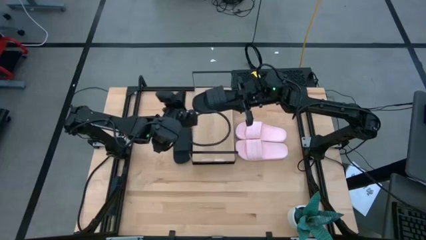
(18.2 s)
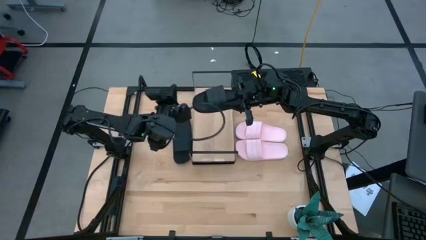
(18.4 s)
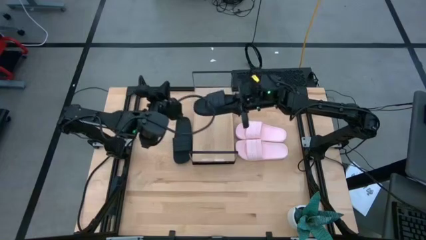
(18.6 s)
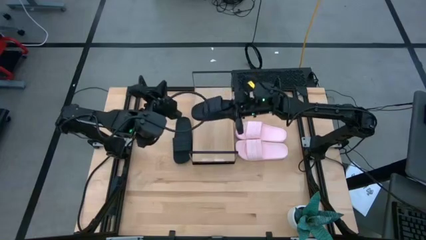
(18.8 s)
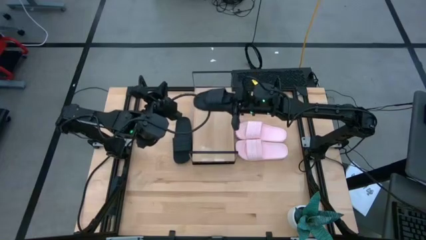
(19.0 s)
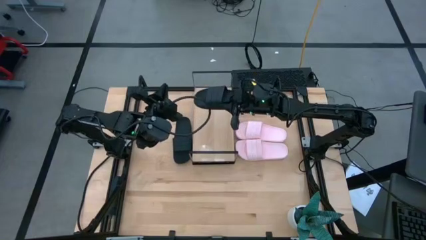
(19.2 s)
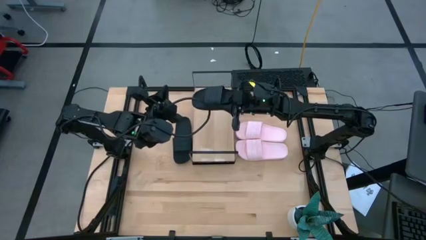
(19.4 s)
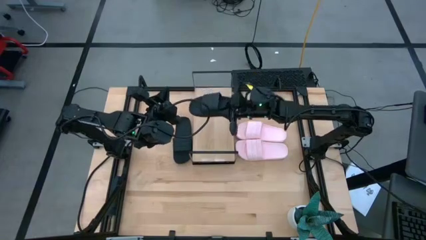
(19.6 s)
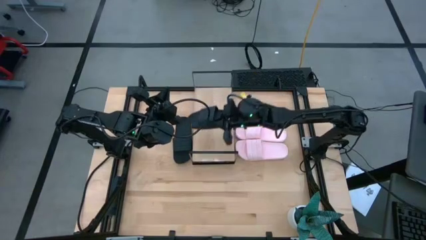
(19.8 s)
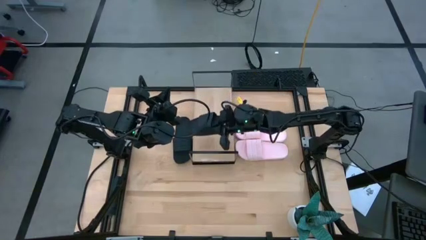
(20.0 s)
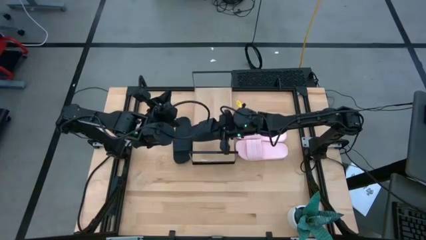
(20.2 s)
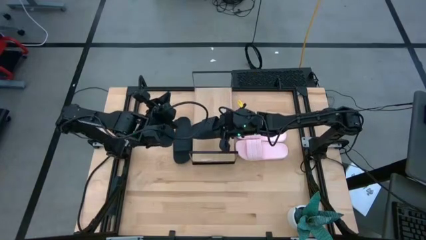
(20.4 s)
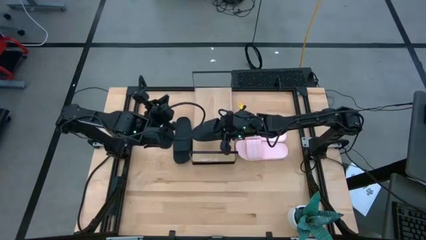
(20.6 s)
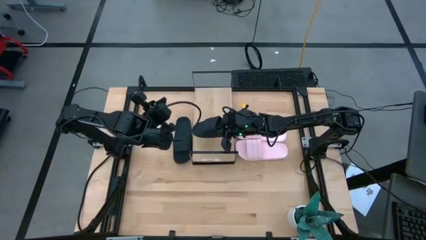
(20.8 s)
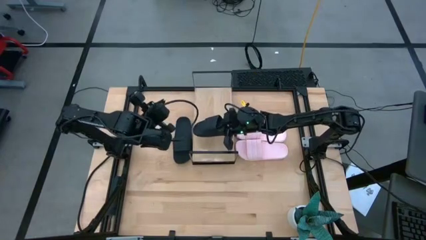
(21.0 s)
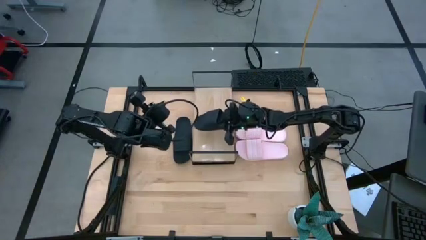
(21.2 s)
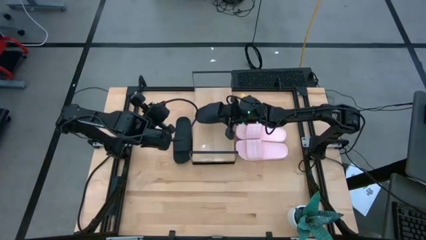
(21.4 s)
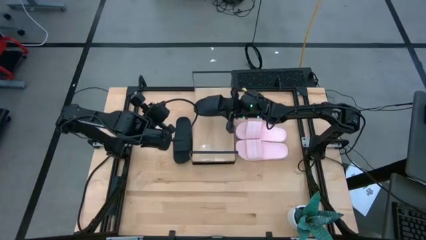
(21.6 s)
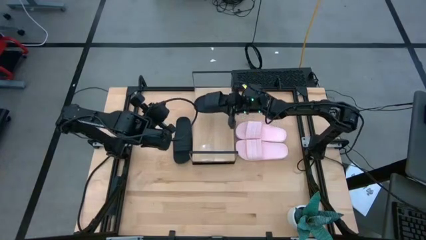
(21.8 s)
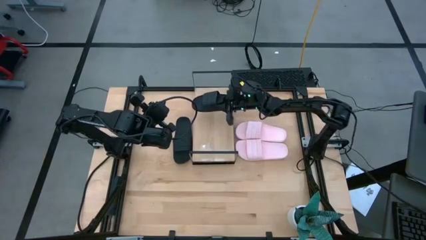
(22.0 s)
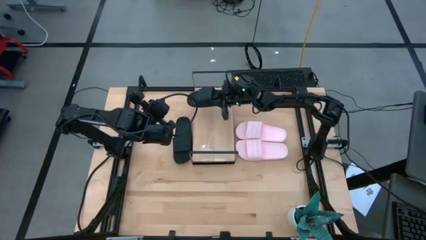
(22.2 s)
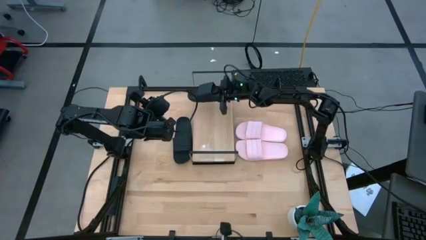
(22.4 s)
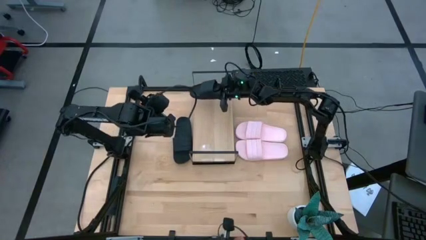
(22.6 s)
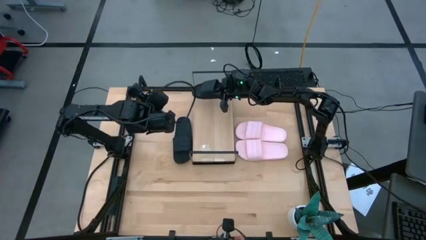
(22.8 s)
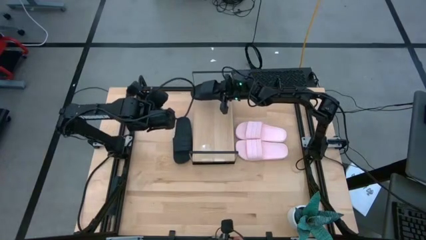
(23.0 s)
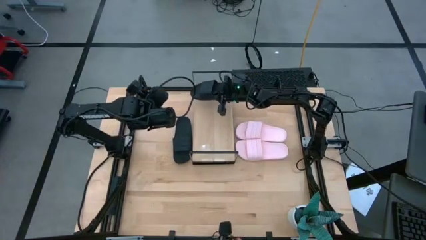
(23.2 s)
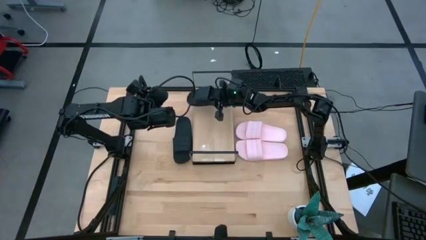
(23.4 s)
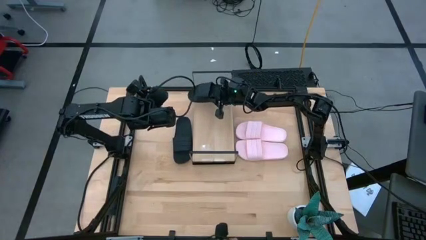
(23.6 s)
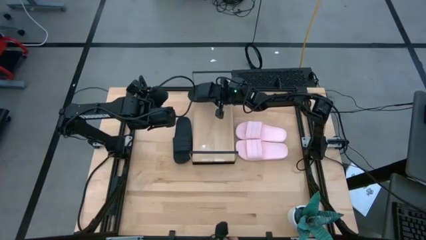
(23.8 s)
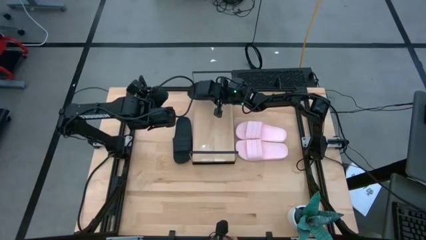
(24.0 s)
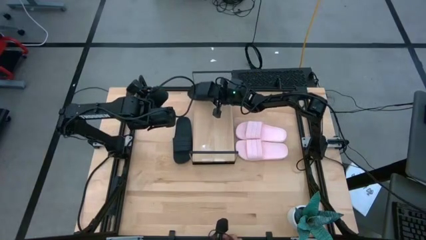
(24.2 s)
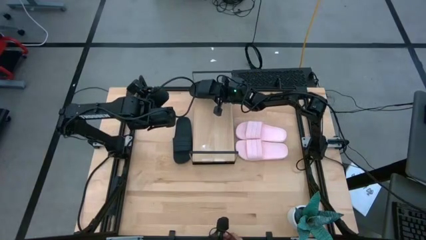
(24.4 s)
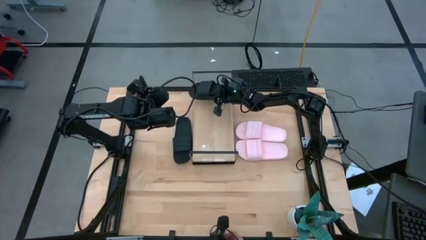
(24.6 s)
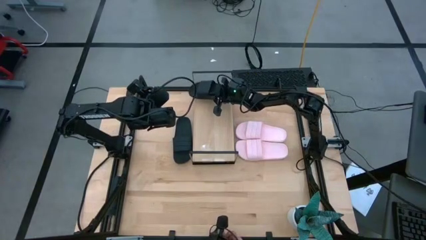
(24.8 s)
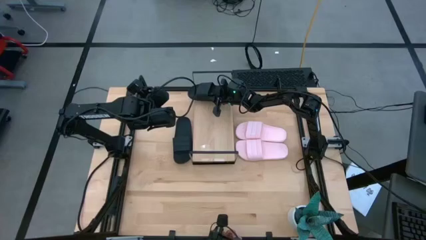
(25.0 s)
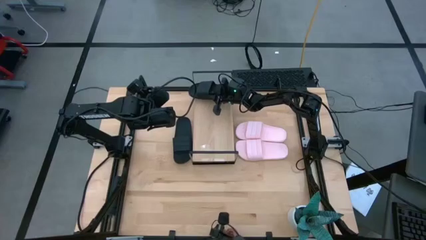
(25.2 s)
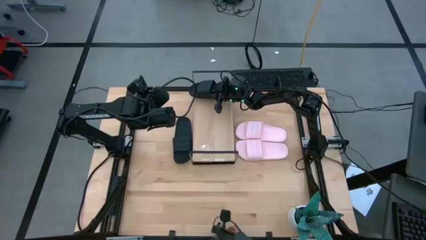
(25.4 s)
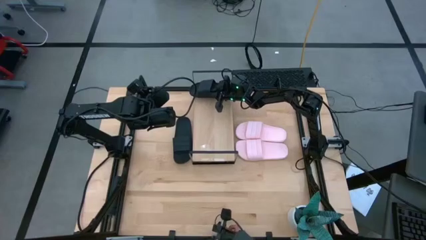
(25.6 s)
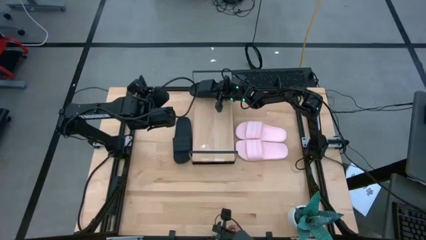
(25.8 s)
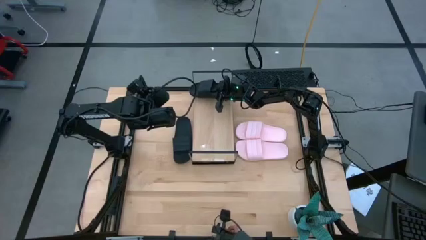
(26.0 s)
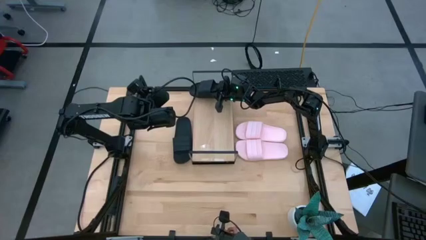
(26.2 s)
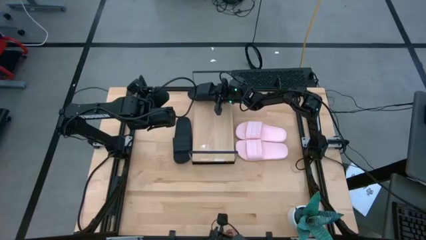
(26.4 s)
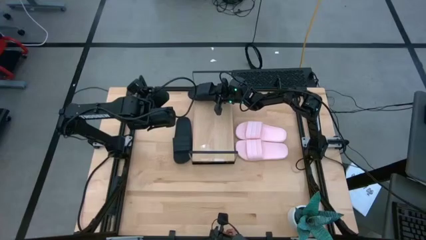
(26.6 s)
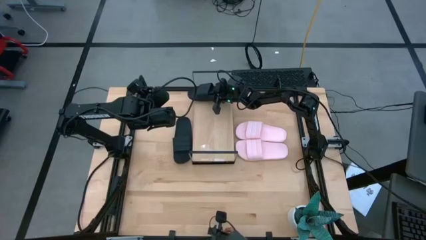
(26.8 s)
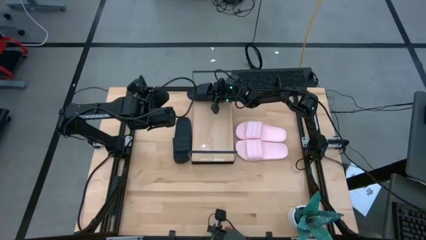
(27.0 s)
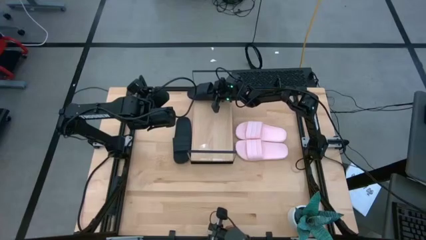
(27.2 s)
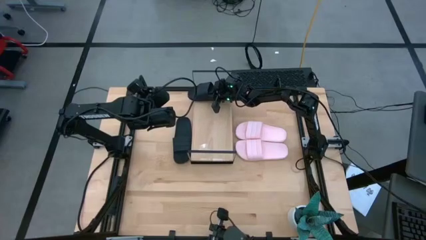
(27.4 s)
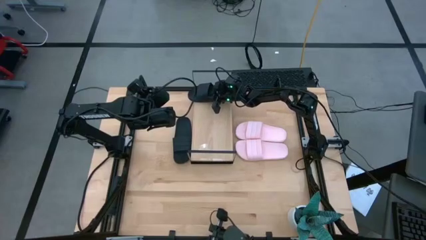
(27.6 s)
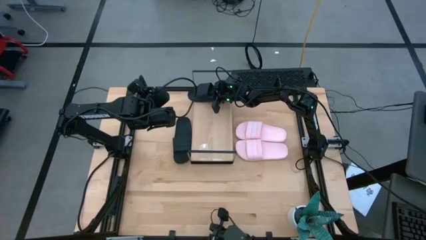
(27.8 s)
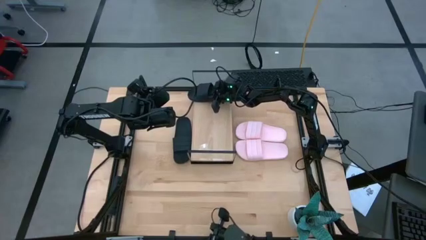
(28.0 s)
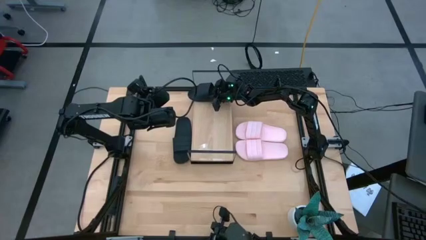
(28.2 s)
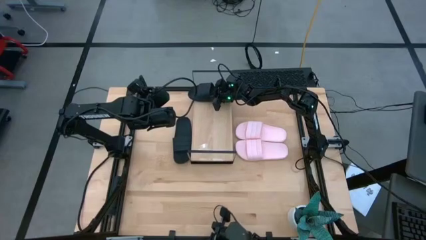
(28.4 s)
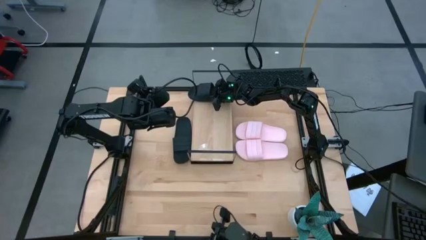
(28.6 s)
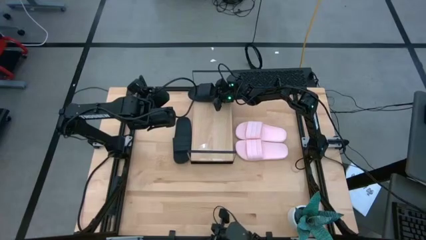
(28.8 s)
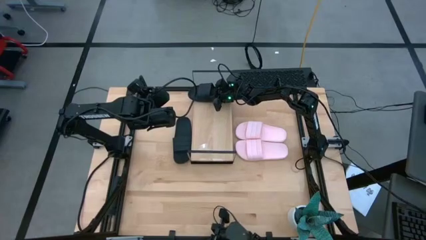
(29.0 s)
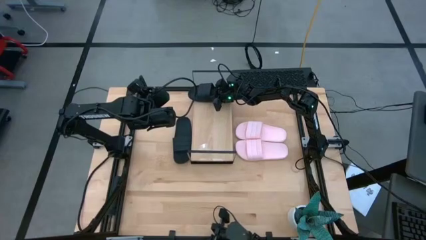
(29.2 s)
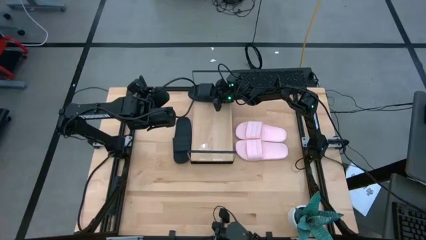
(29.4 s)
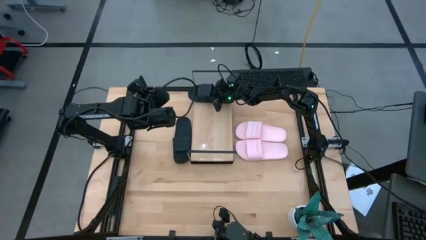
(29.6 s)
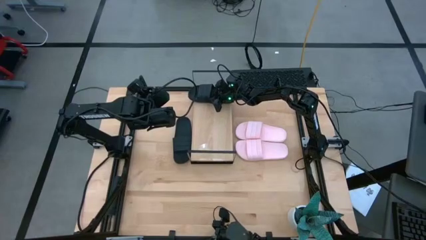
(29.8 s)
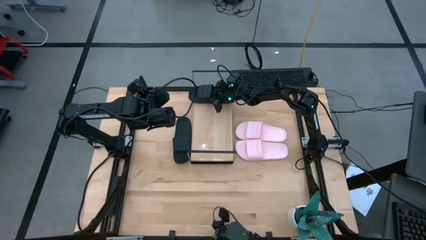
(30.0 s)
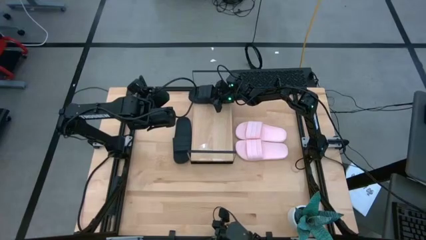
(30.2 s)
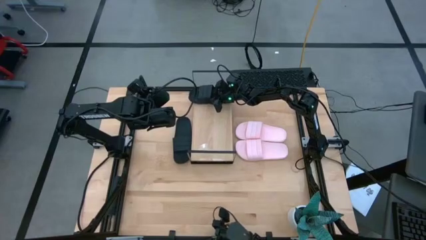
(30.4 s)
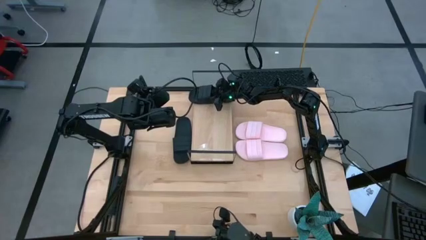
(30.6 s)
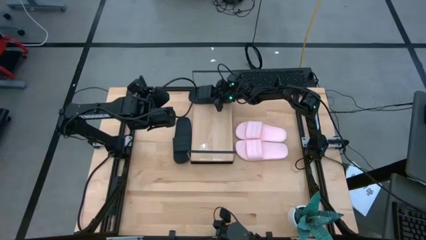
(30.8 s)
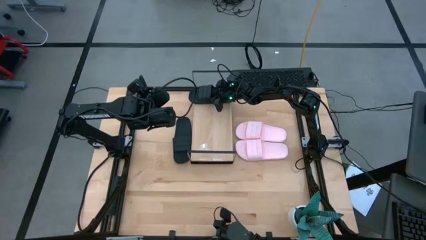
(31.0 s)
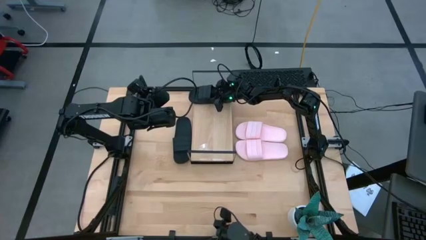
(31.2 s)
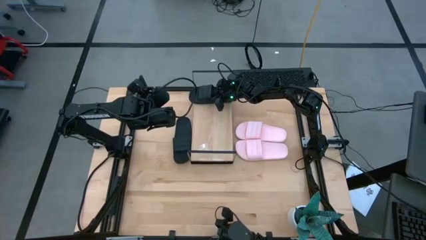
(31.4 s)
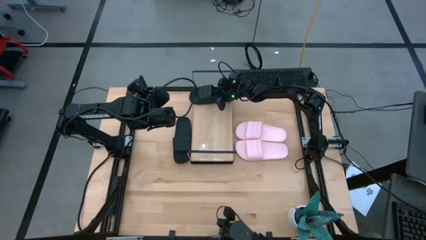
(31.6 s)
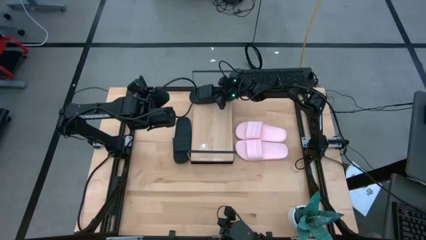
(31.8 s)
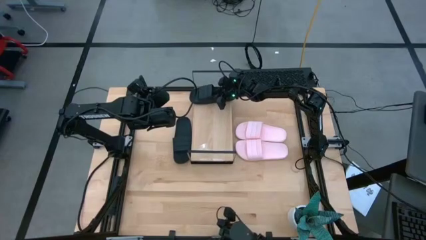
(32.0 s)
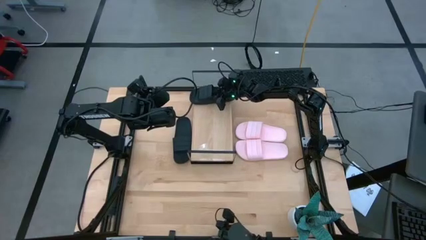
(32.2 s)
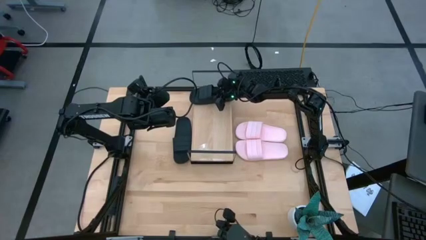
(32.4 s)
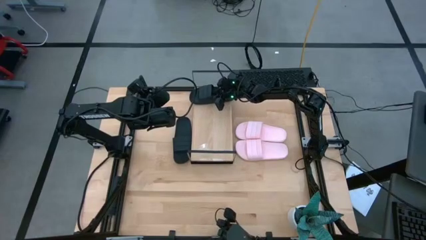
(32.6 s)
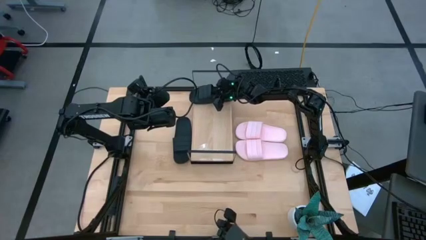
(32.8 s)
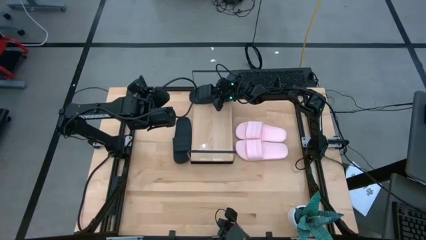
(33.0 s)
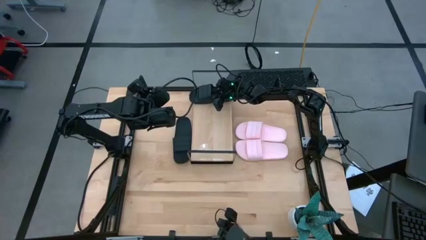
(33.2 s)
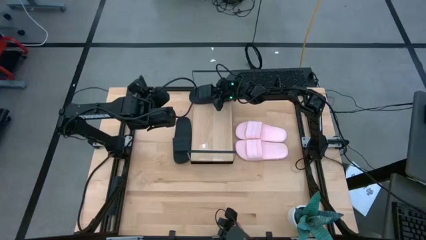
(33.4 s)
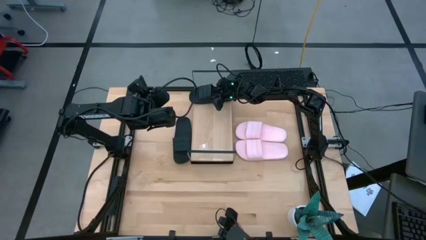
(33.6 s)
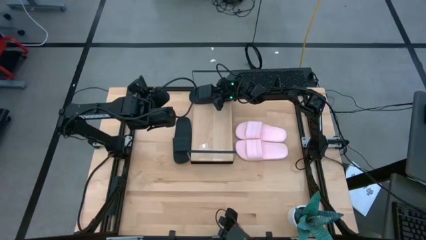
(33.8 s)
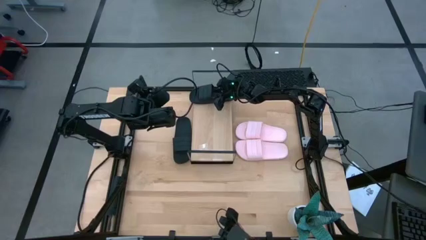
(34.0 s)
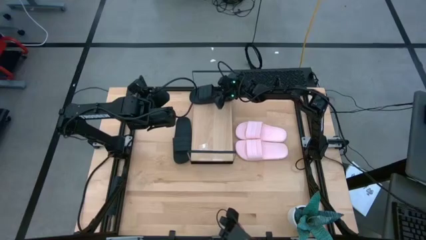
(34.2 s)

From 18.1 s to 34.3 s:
Task: Pick and place slides into the shelf
Put the left black slide on the shelf
